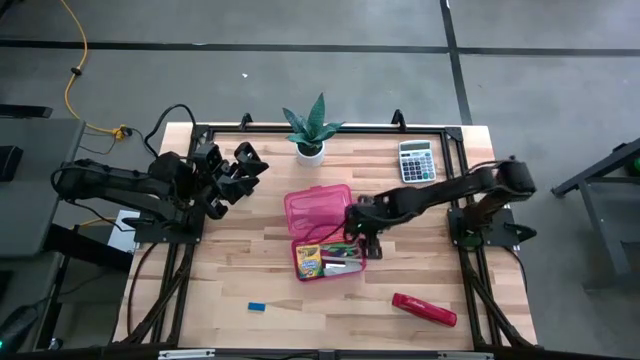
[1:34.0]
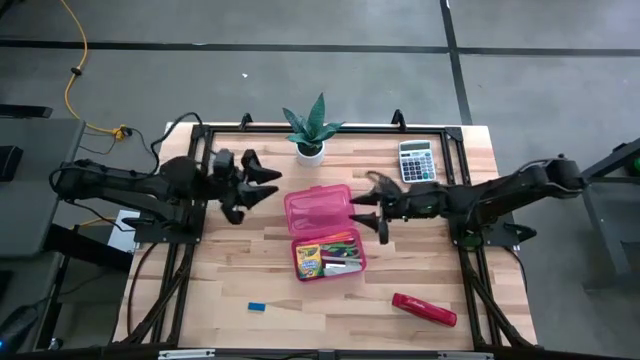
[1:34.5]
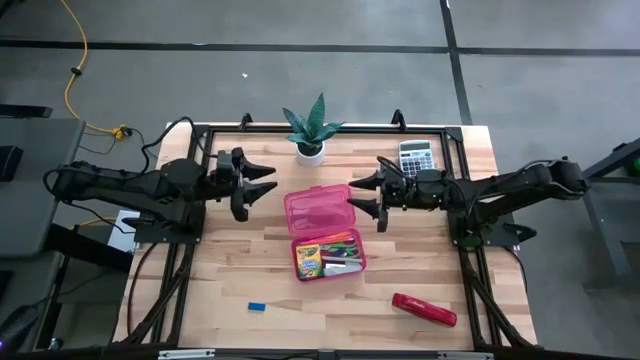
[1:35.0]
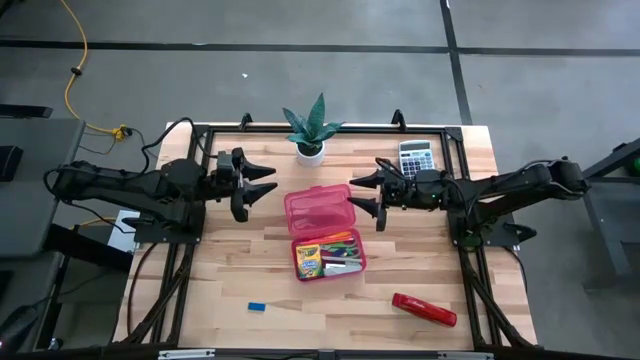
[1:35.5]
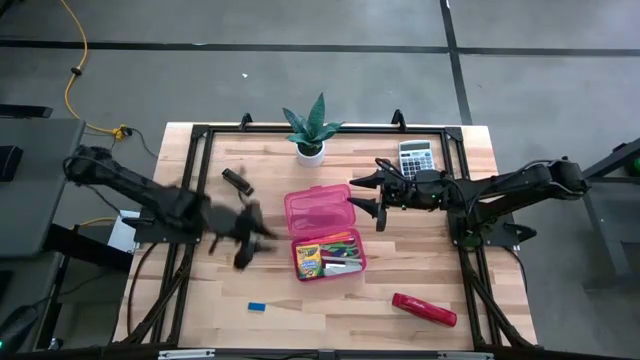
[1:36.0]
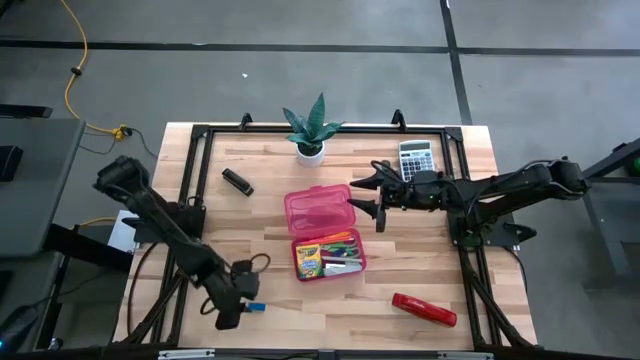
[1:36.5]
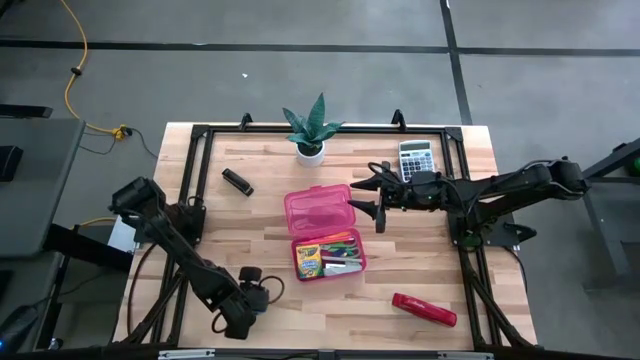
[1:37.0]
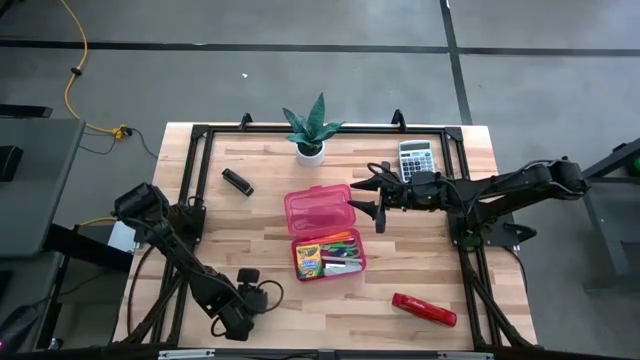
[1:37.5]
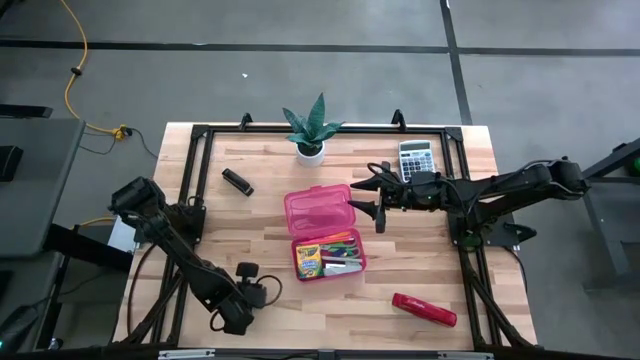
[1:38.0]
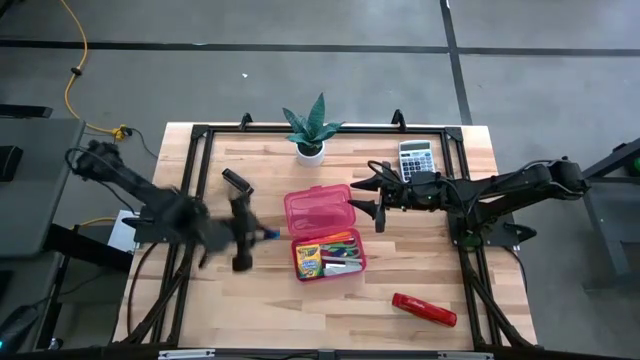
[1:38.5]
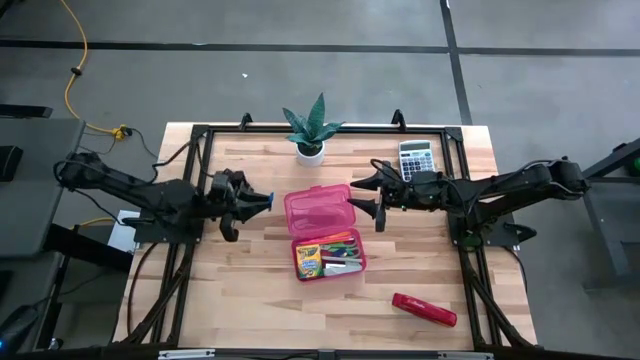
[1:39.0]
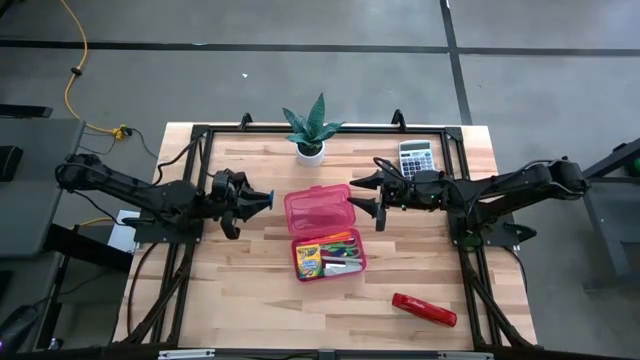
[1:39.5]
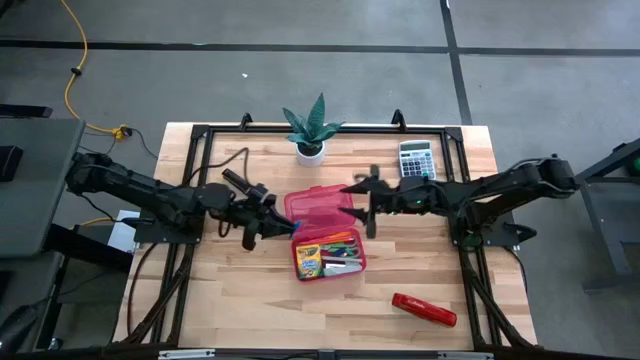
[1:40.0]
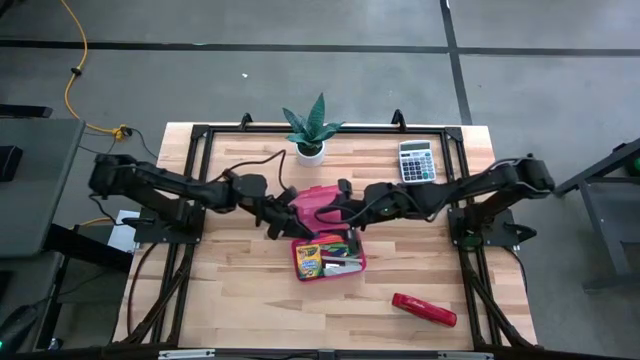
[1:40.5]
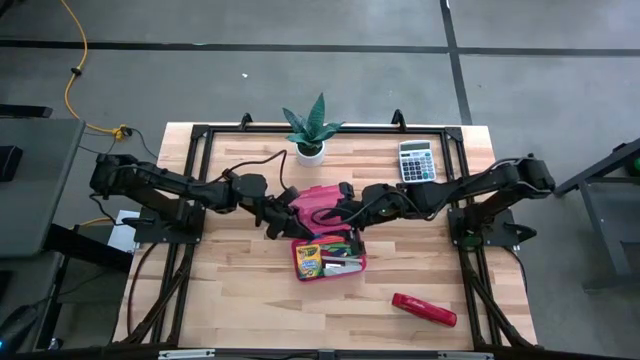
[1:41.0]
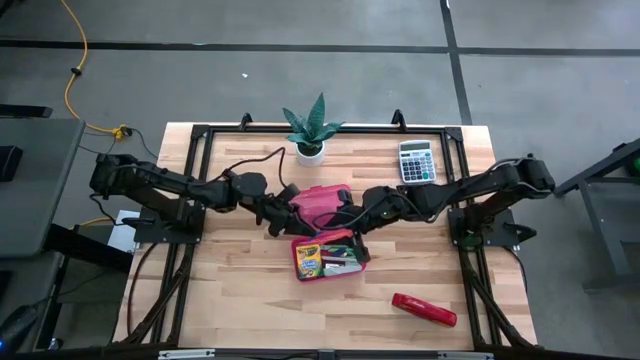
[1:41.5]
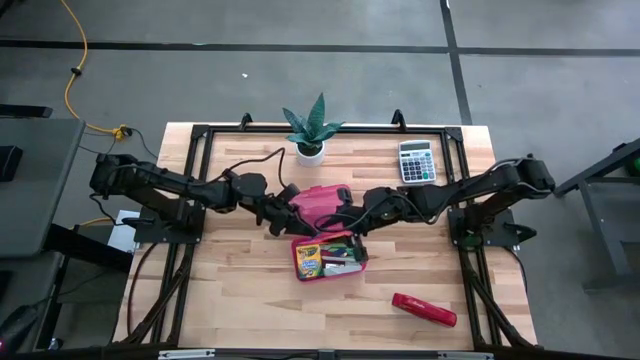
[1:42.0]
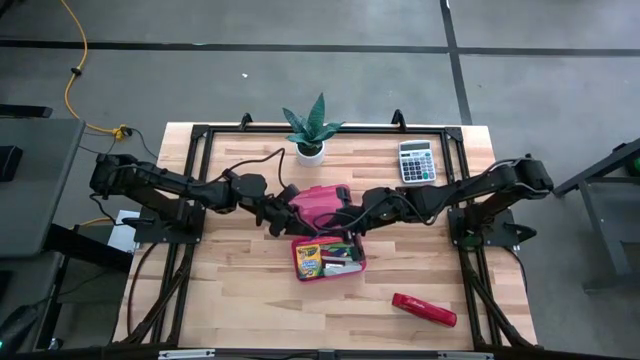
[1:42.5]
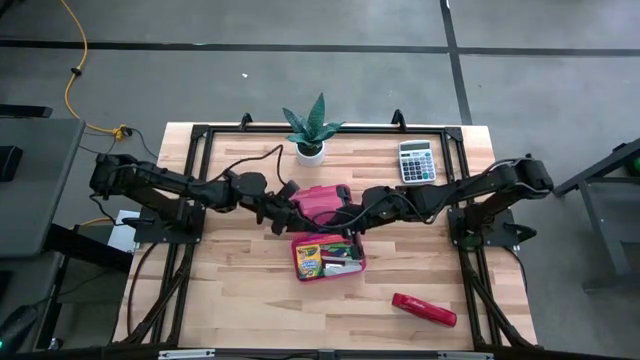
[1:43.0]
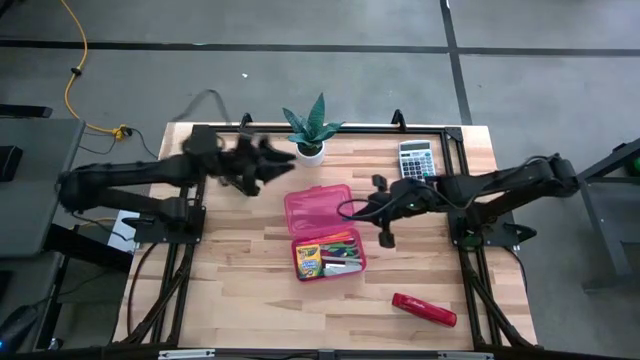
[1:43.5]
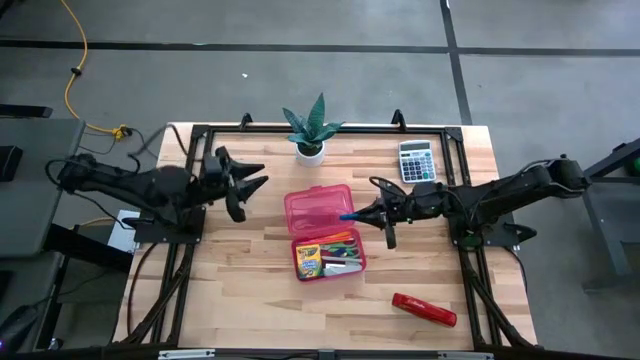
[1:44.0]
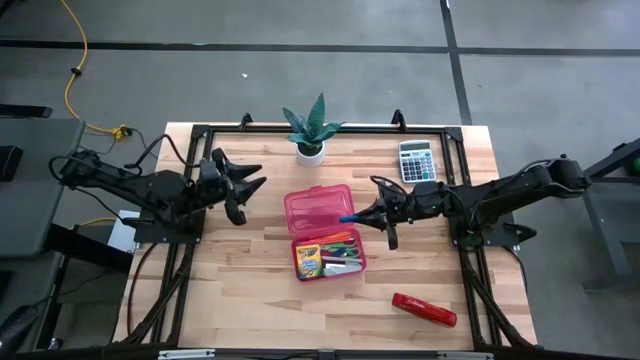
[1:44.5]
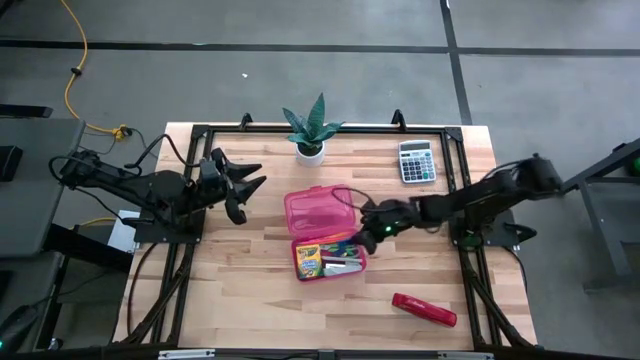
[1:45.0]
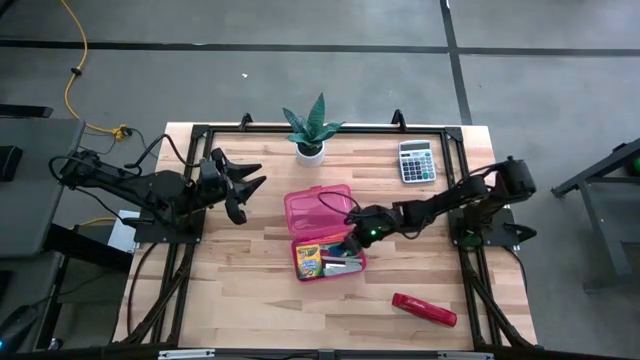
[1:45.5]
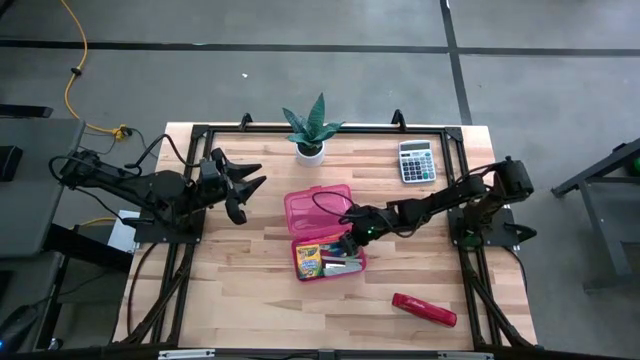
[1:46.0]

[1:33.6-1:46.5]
Task: Pack school essentials
Put the blue eraser into the red supply box

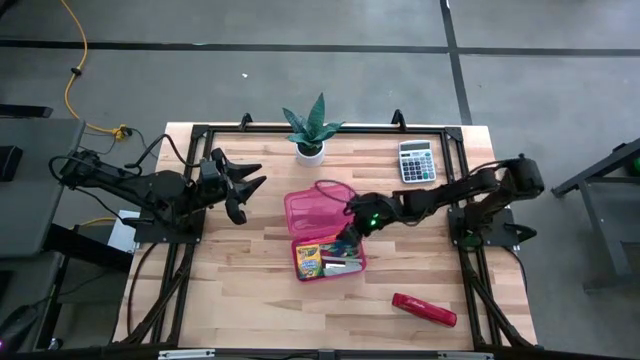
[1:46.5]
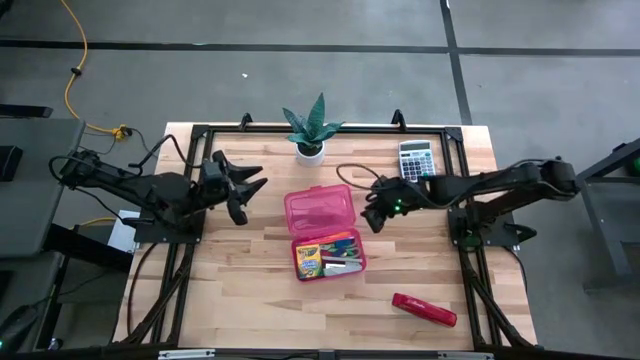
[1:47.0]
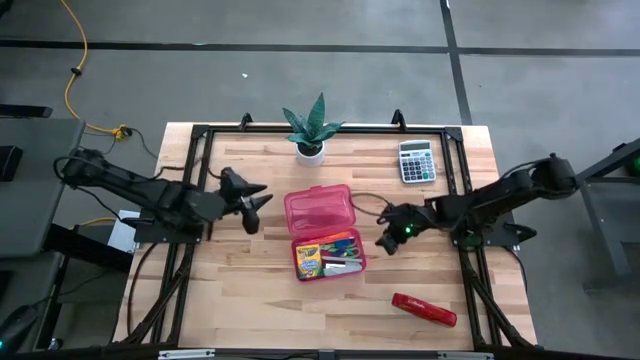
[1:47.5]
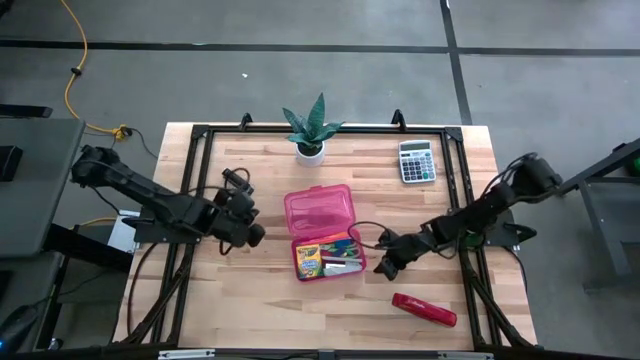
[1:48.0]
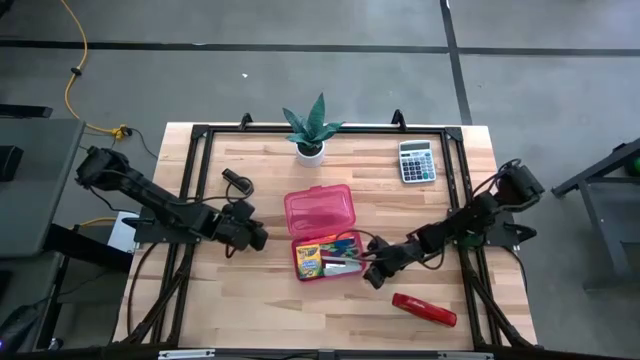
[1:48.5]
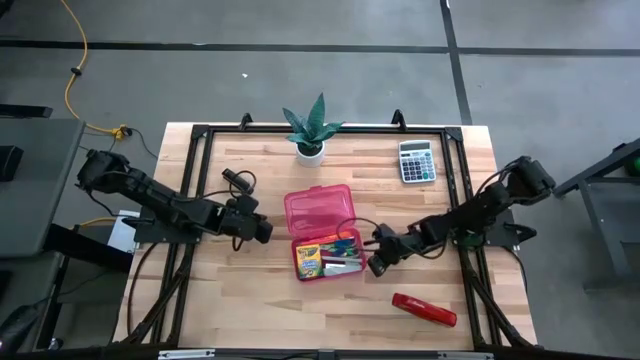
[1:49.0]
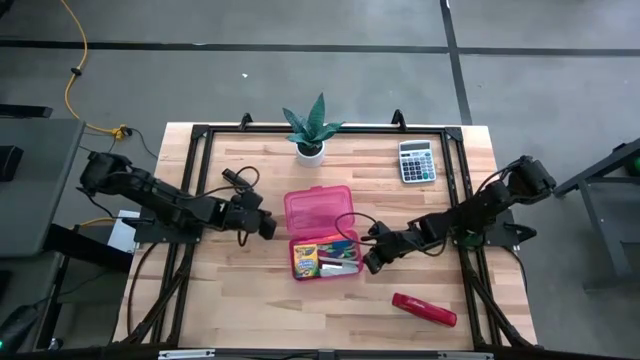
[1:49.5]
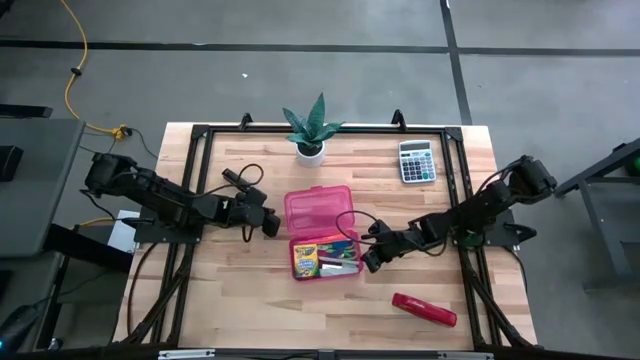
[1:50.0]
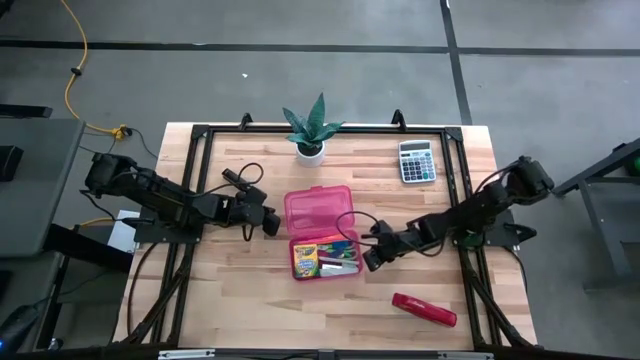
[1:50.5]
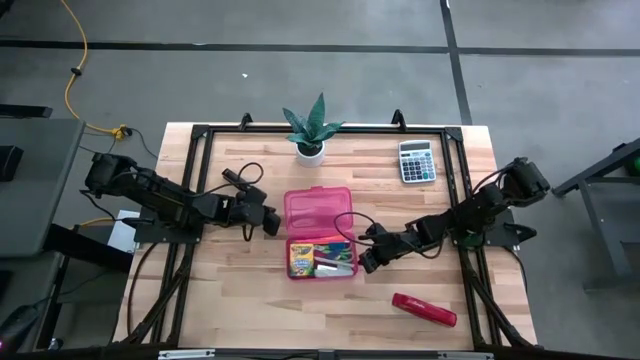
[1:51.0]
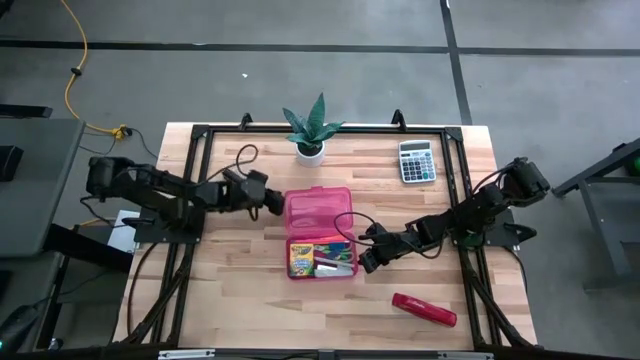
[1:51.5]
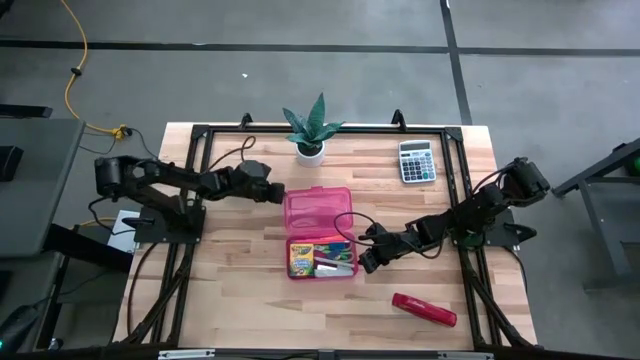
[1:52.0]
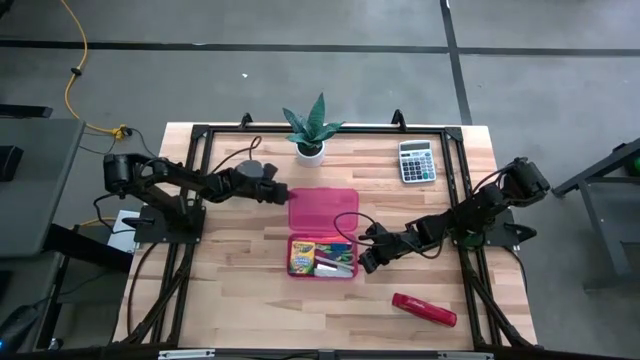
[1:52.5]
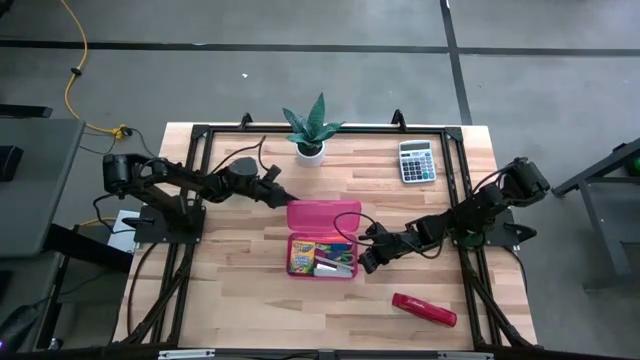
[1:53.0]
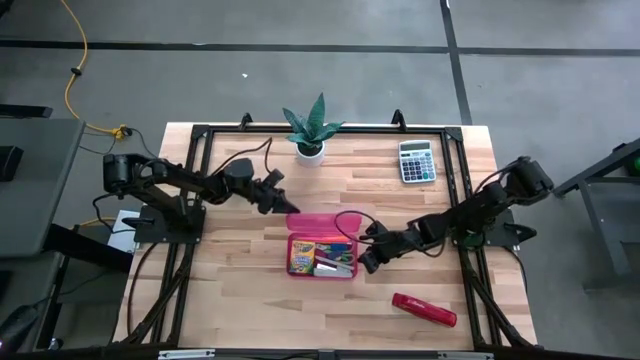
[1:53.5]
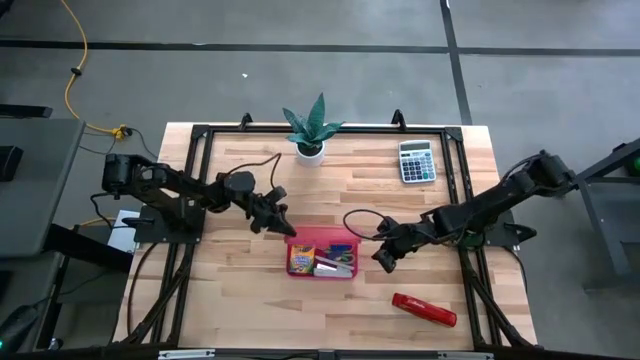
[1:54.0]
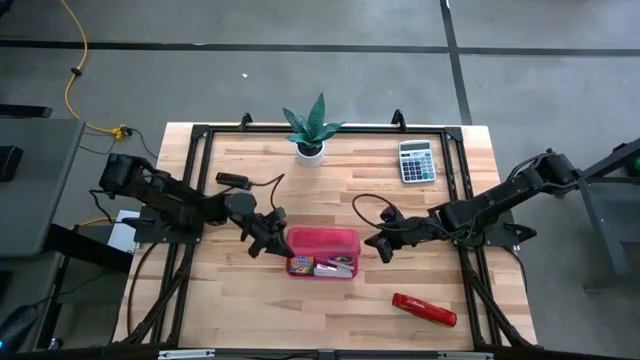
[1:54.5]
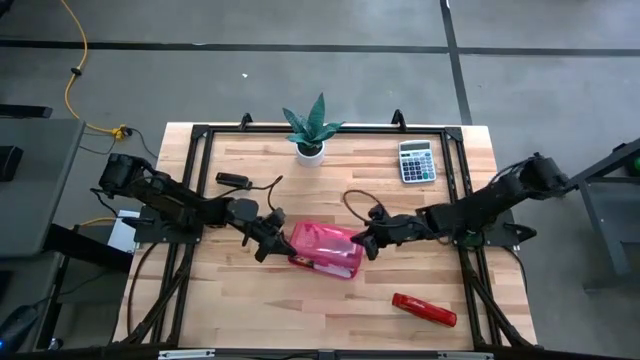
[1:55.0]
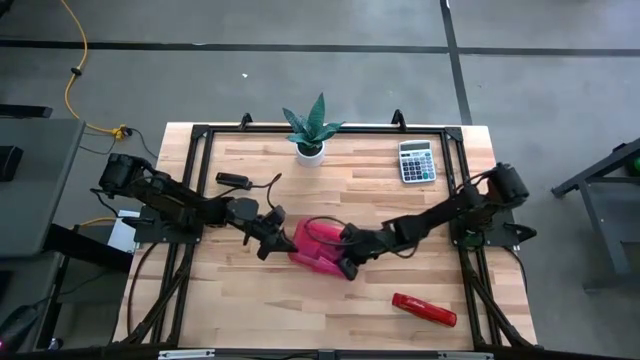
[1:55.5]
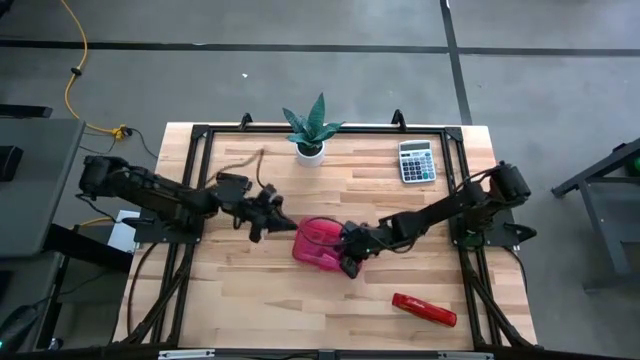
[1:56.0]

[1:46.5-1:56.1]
Close the red supply box
